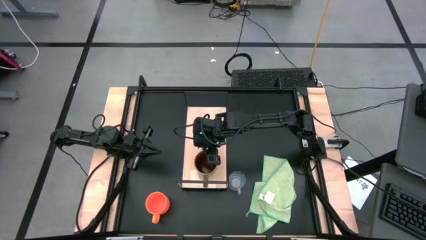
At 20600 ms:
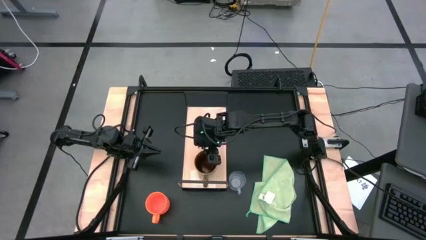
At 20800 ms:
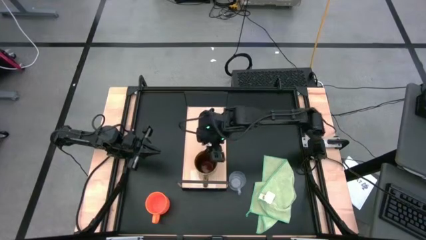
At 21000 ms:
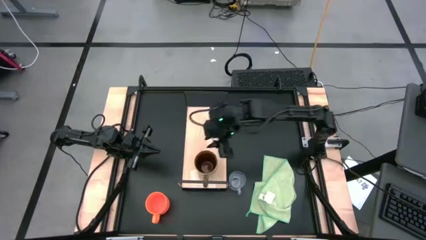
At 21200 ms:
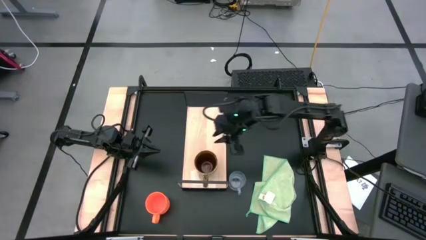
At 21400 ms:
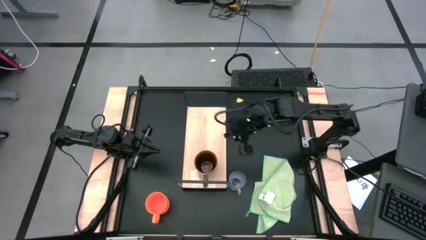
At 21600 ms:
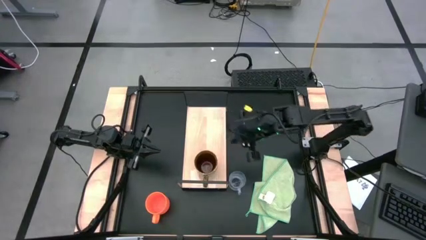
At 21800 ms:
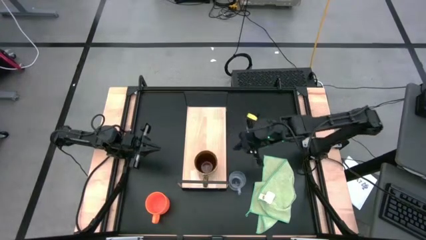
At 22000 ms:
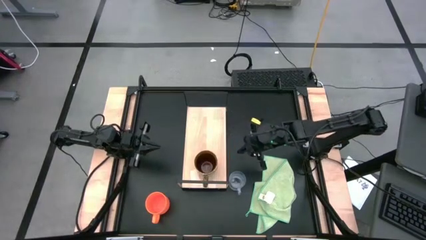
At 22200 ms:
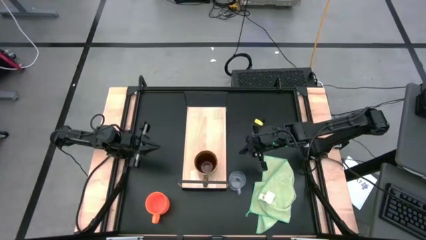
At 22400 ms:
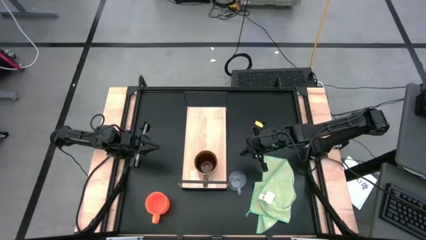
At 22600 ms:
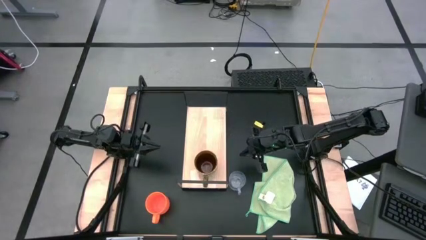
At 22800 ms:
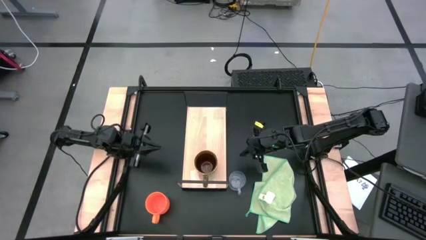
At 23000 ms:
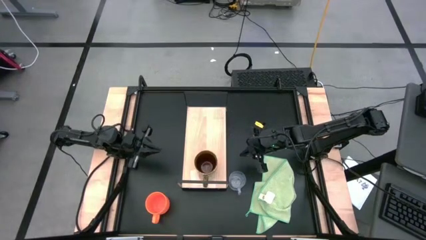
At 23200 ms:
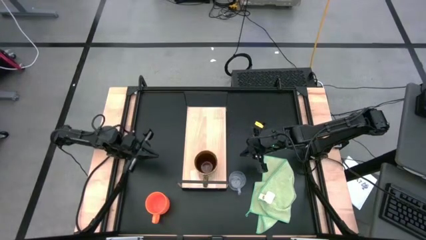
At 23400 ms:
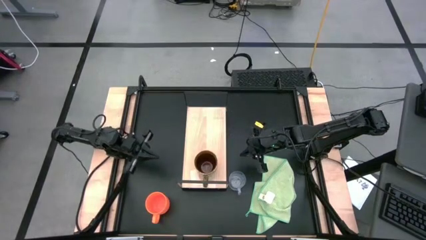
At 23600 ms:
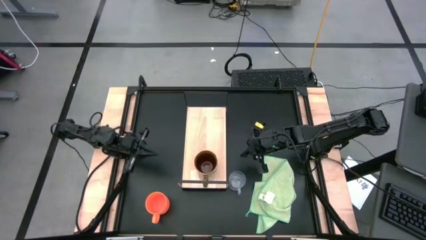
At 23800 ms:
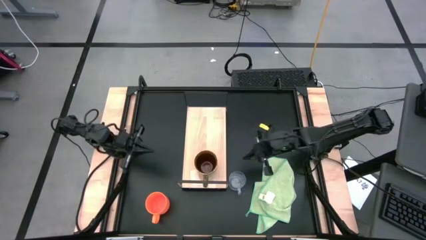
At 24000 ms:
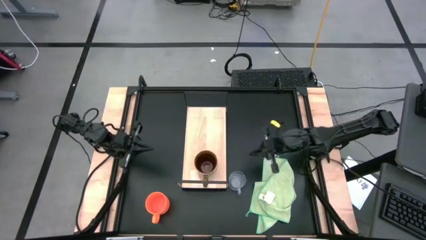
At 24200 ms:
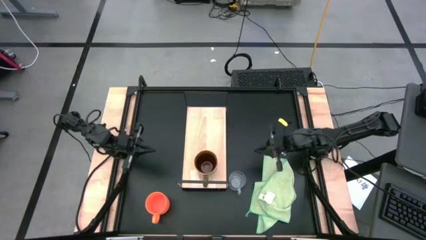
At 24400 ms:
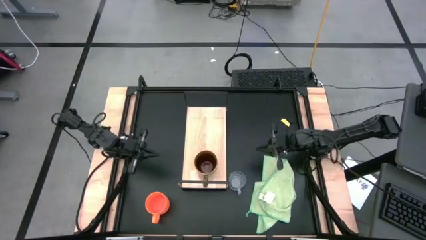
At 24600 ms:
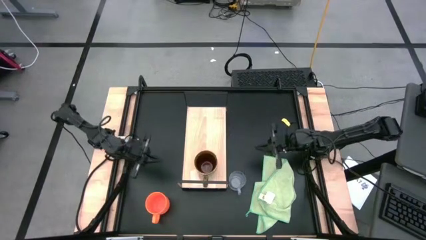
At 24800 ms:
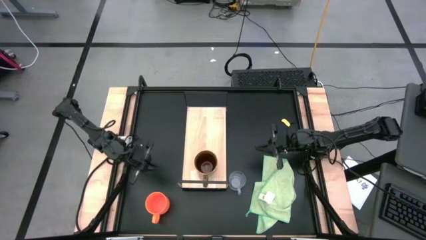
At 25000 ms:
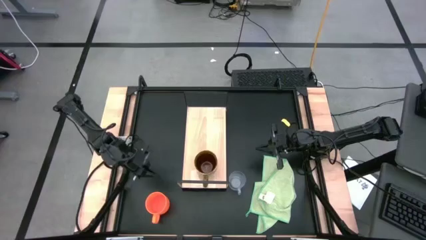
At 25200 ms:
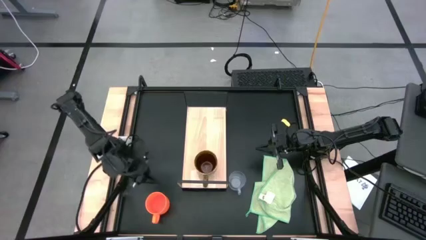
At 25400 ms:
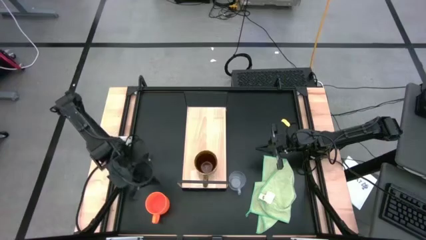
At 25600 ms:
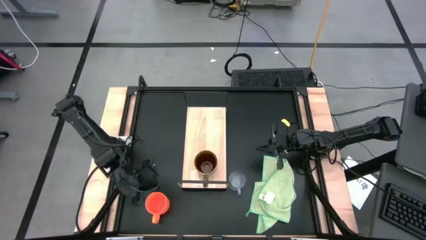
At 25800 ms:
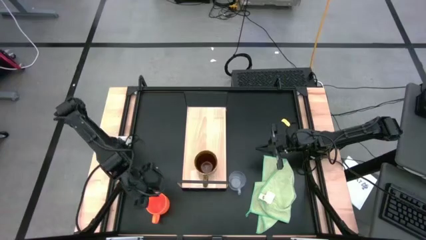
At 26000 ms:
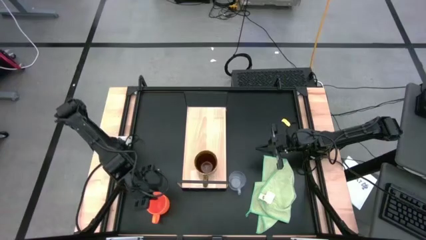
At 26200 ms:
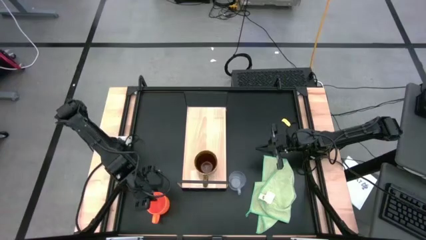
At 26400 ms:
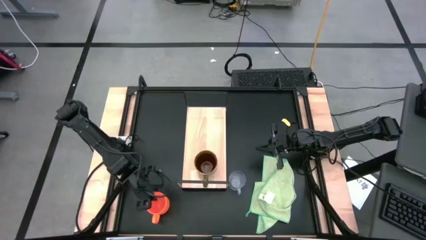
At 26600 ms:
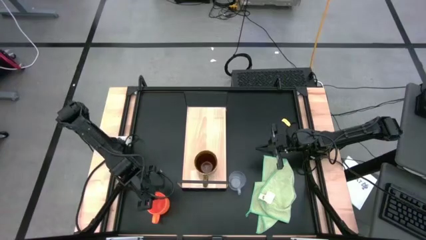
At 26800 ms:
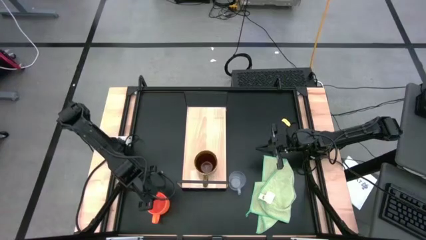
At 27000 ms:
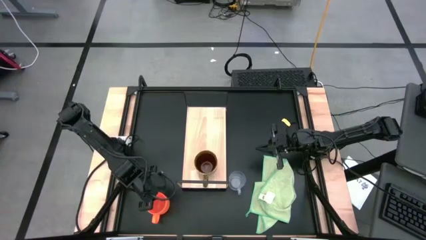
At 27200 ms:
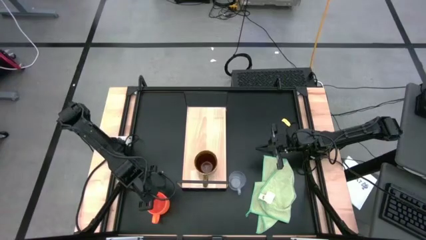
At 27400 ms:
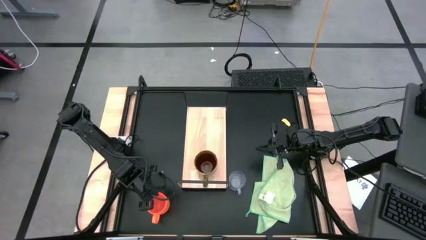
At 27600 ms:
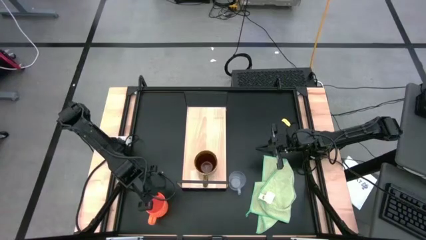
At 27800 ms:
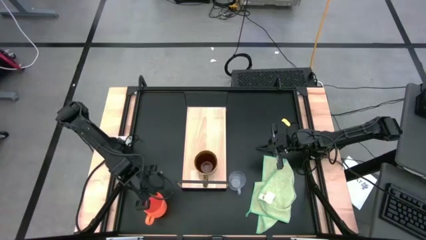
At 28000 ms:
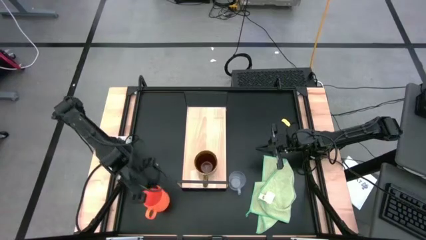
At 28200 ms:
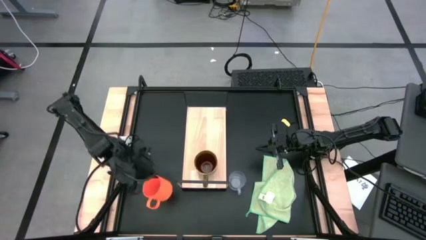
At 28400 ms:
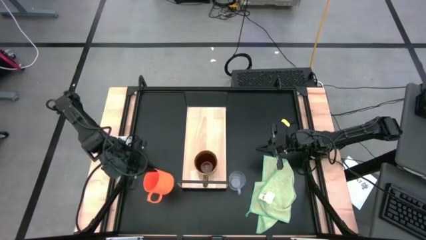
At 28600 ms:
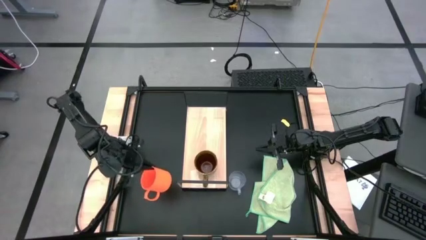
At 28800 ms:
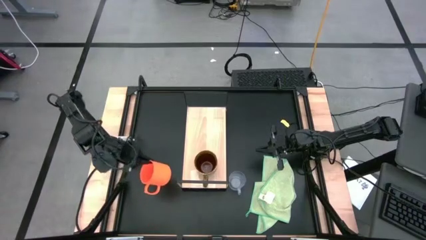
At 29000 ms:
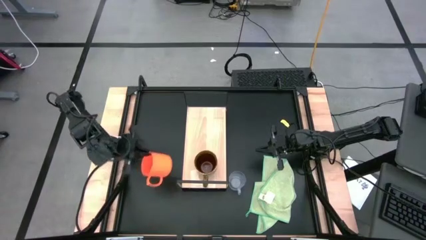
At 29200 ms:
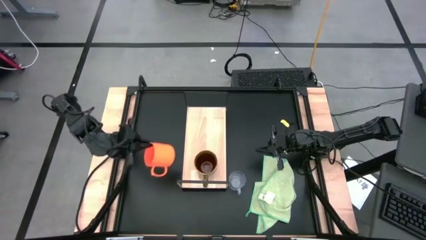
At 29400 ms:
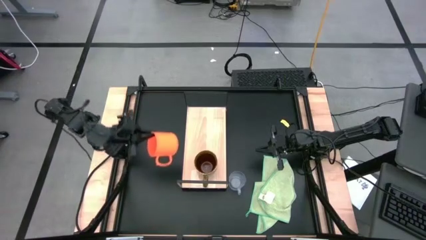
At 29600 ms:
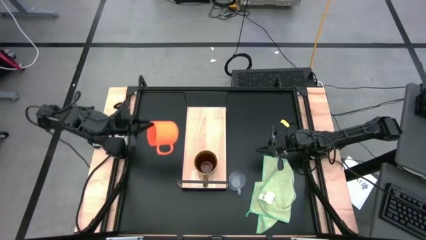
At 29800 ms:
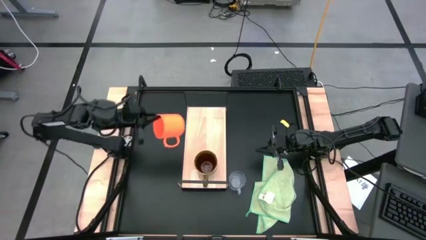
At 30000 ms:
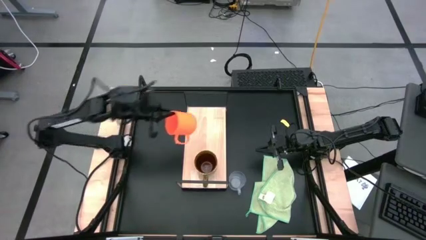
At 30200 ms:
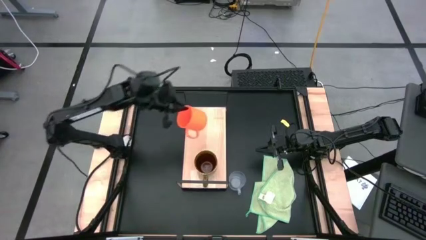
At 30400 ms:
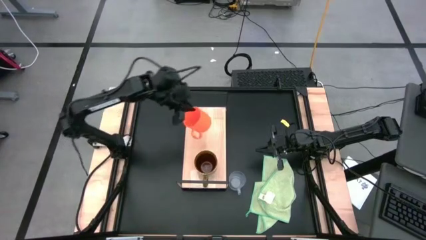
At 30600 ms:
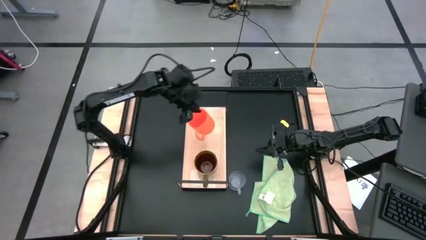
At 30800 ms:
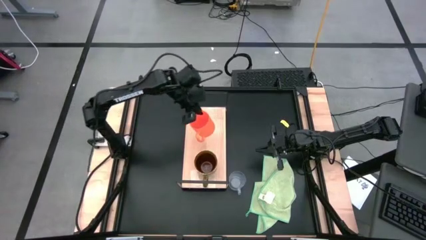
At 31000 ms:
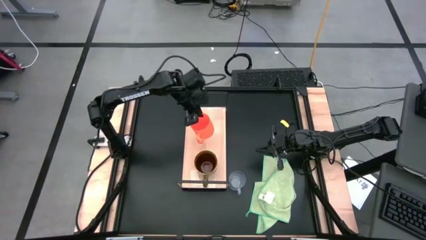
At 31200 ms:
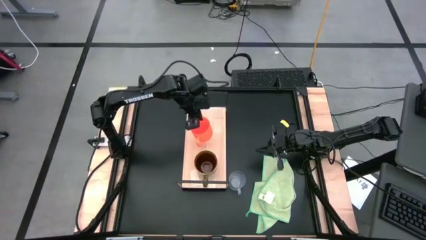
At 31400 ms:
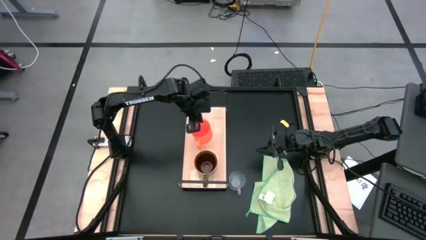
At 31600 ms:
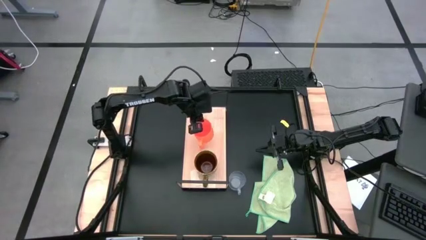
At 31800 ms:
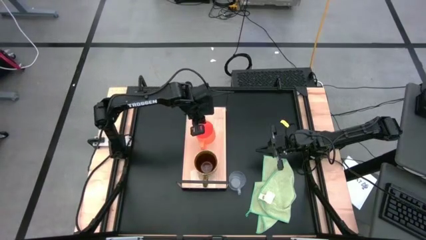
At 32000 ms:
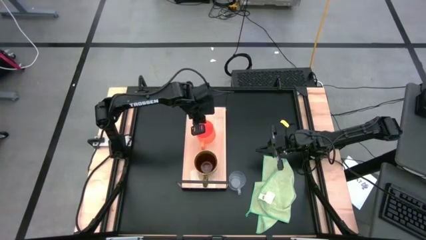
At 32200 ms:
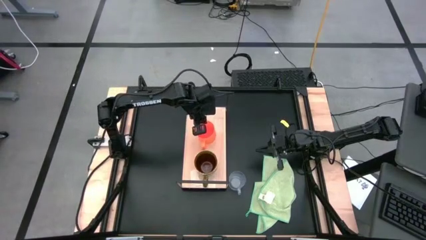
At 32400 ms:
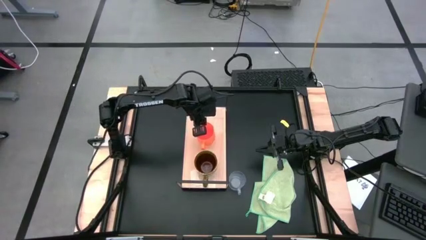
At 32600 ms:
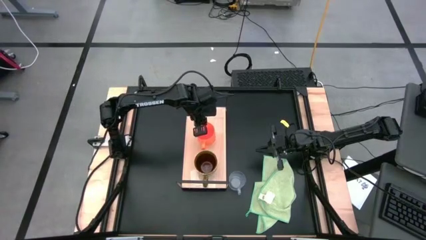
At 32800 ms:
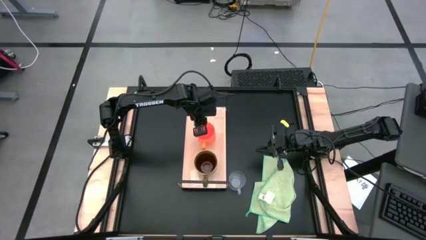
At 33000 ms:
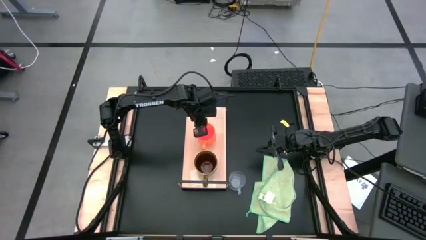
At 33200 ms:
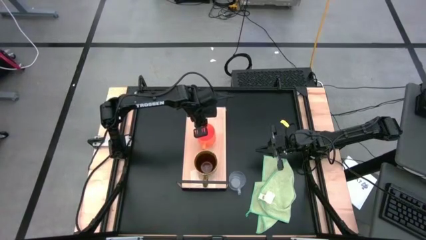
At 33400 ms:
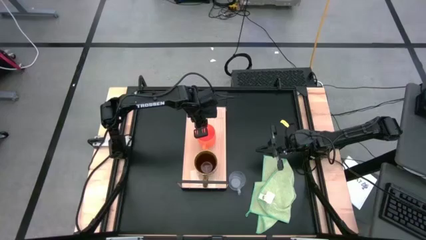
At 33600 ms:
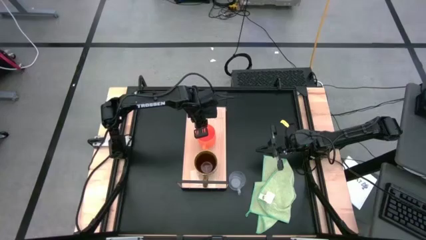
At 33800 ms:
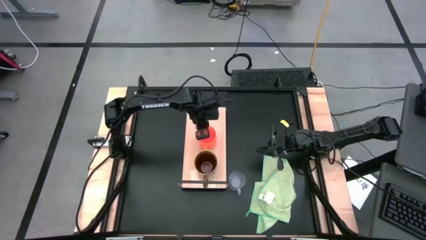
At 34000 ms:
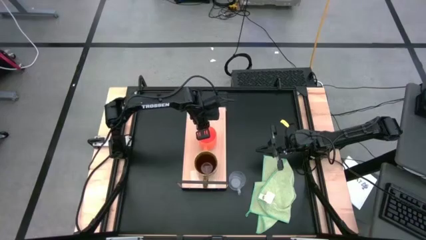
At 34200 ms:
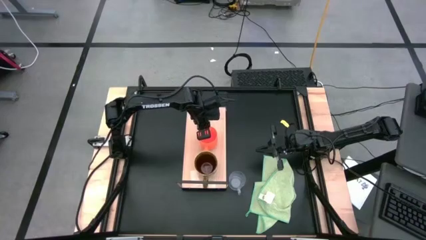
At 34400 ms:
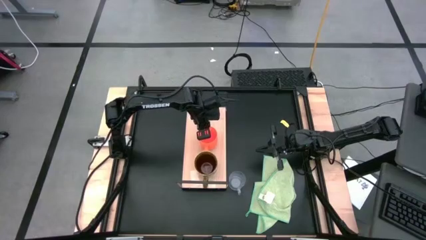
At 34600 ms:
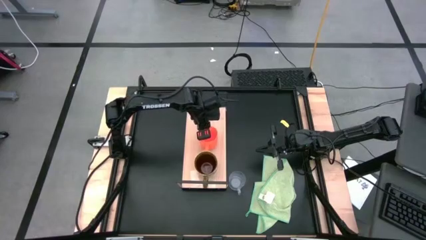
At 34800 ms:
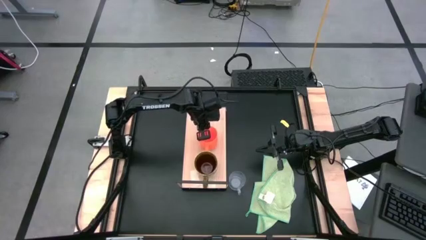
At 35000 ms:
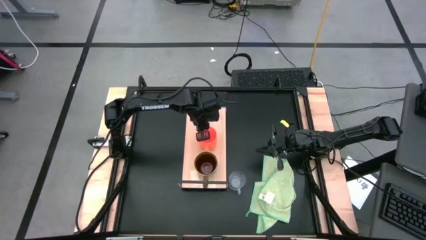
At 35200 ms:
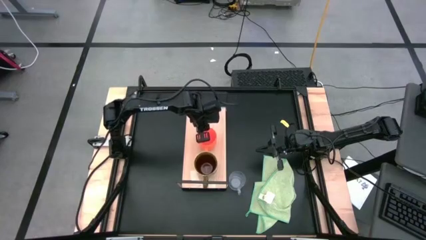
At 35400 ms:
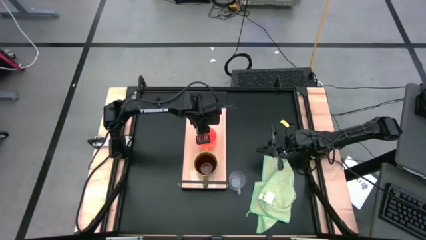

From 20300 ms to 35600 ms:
Task: Stack small to large cups/mugs on shelf
Put the orange mug on the shelf
